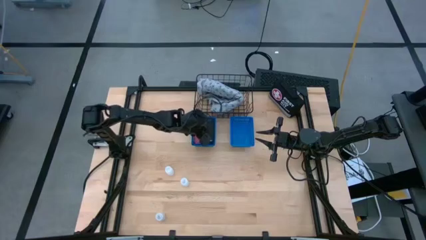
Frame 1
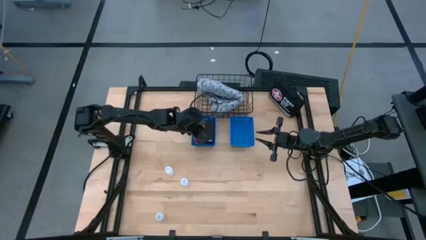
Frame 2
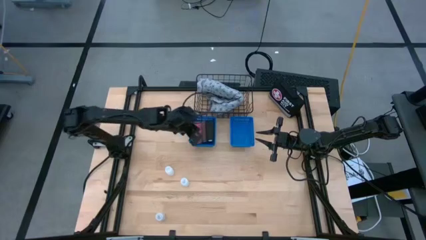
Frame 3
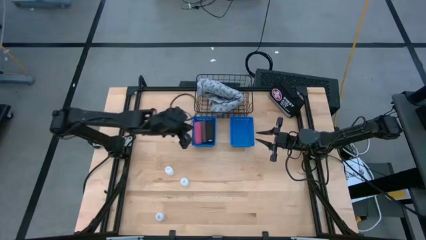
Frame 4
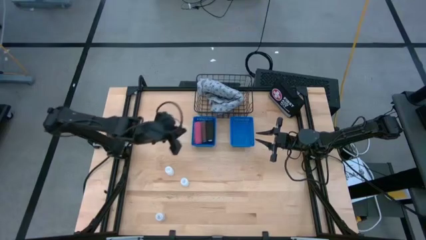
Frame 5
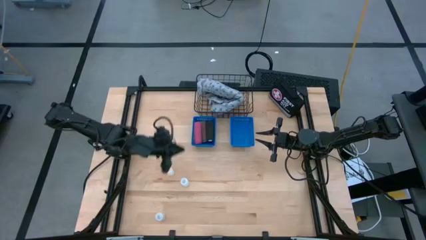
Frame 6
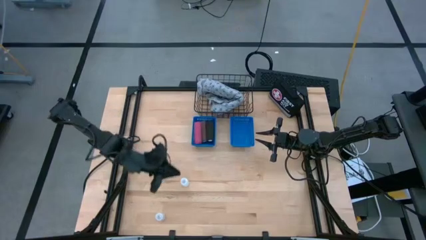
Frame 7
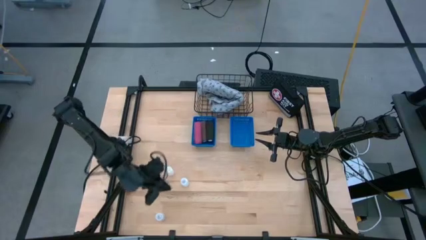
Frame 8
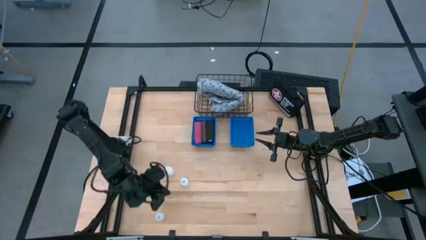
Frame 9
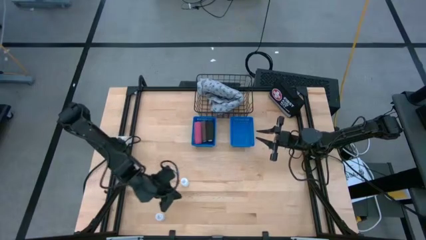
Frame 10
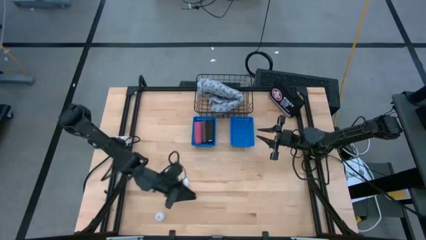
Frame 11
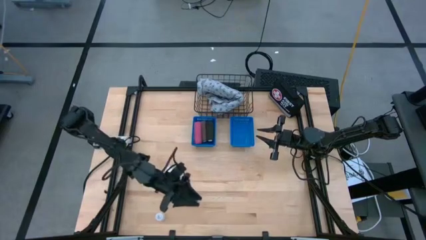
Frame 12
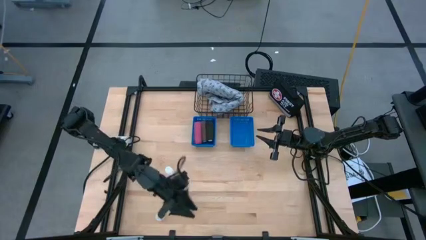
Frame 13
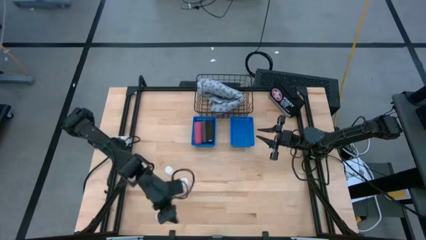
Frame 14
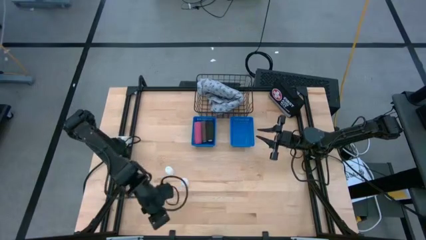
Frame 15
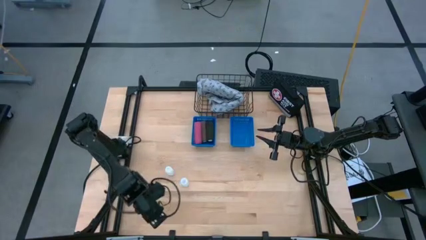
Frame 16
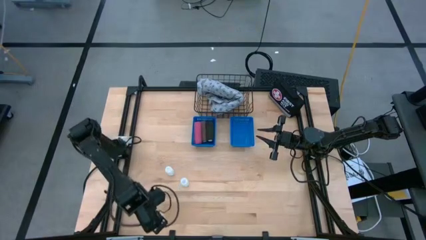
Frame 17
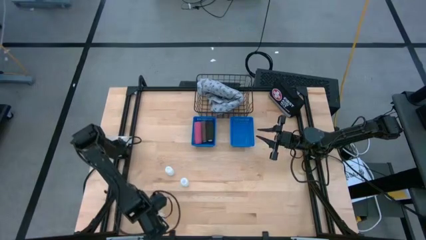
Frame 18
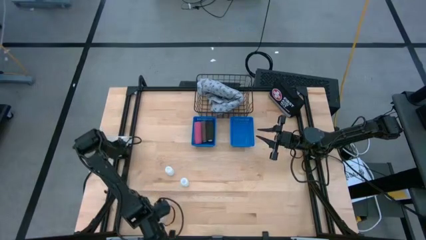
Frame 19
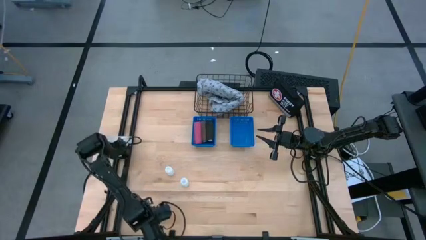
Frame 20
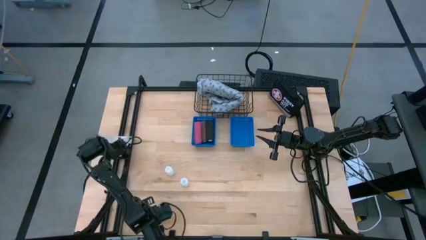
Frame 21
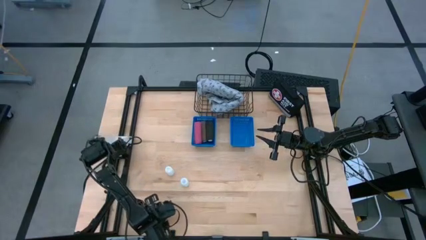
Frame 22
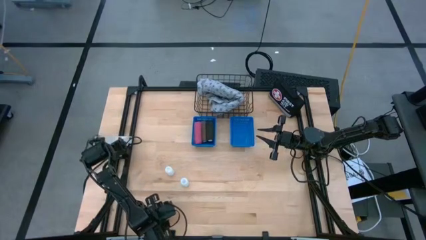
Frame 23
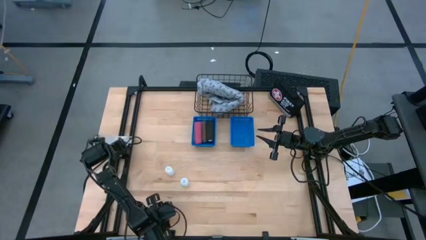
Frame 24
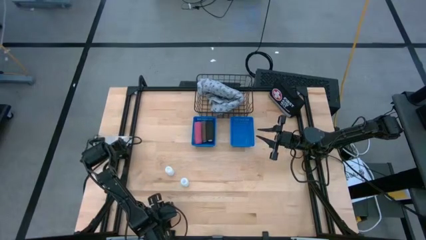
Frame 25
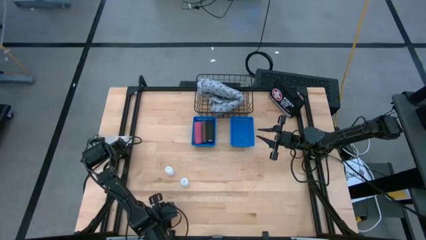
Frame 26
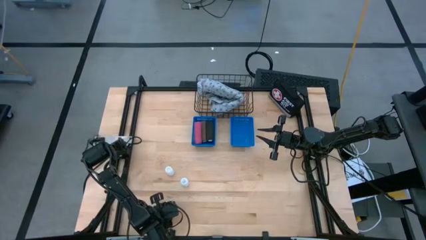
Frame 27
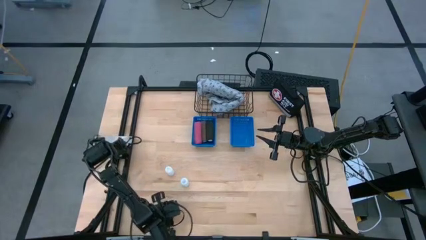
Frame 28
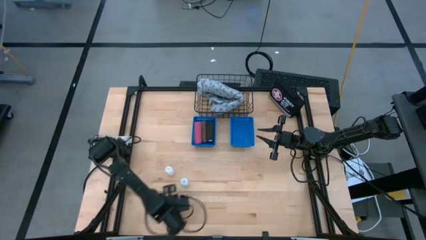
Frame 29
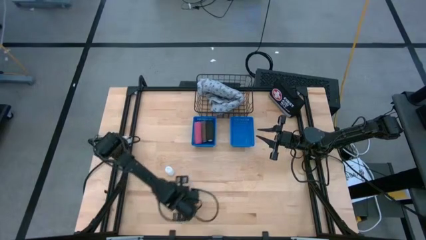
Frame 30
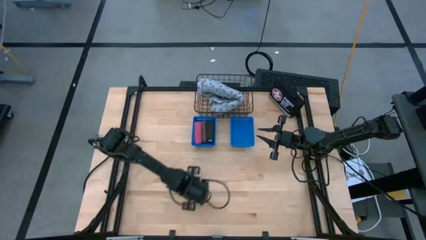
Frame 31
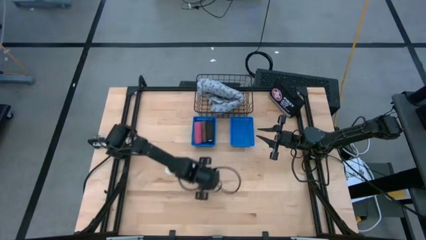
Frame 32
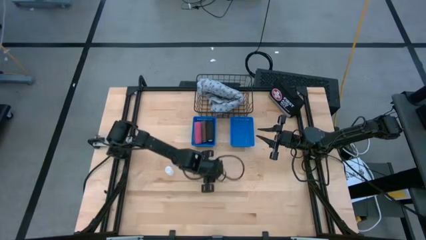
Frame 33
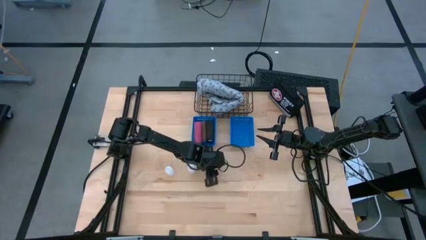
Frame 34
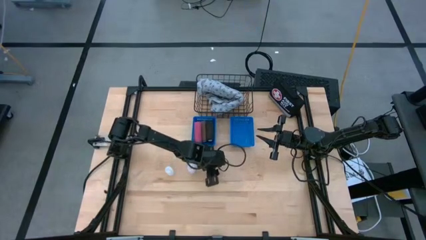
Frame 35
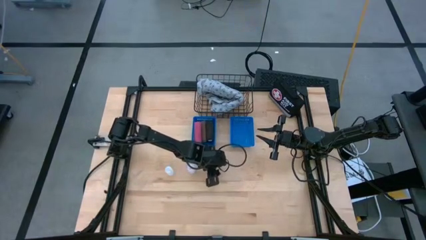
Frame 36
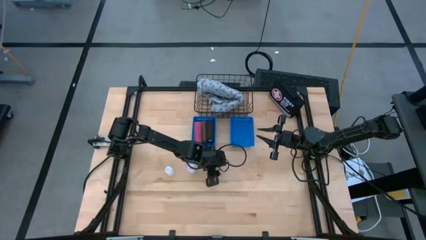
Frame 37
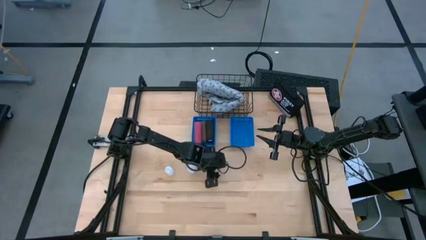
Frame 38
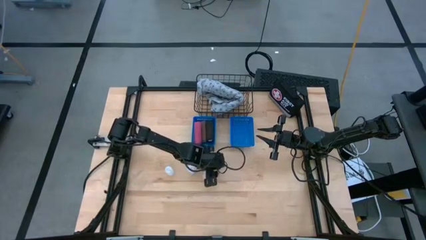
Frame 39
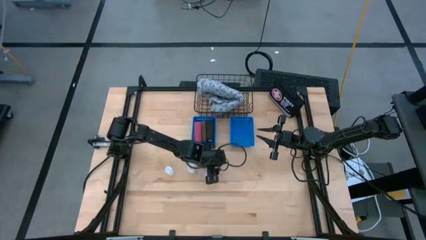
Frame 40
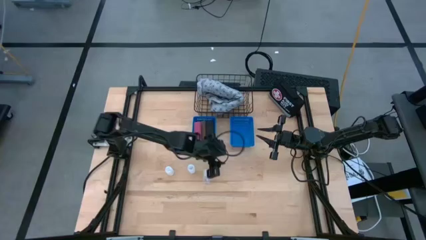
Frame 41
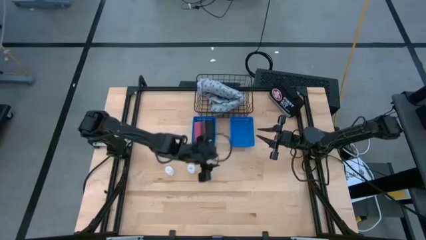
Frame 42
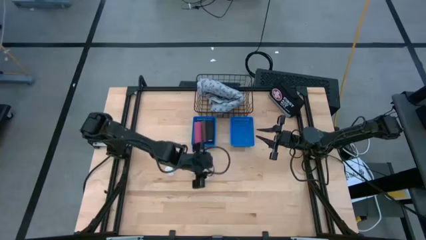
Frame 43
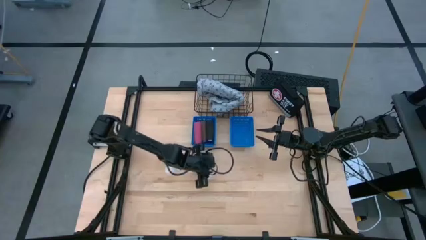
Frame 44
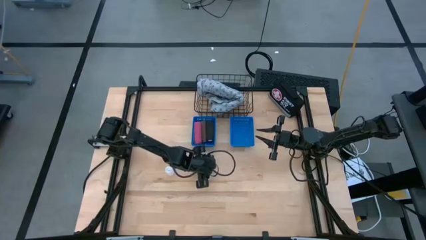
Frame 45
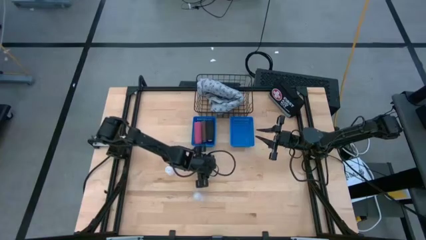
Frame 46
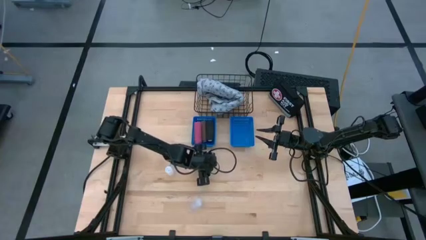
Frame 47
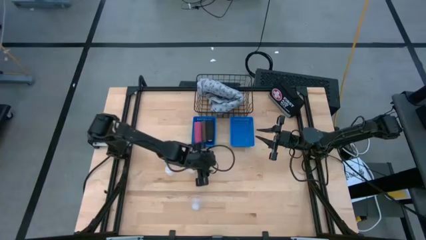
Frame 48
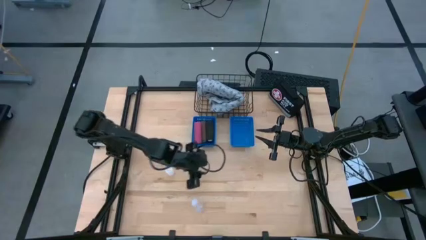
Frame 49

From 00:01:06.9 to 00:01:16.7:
Task: Pick & Place Medicine items
Put the bottom white pill bottle into the right blue bin

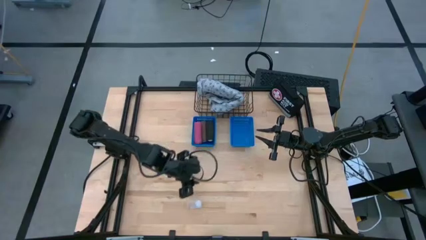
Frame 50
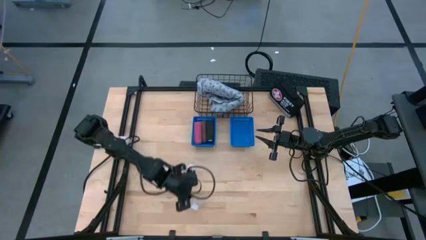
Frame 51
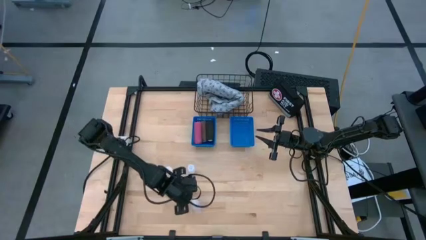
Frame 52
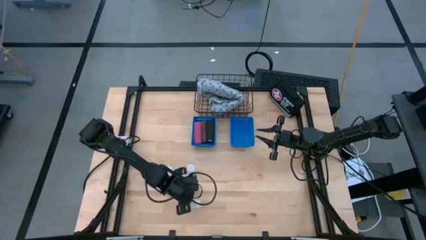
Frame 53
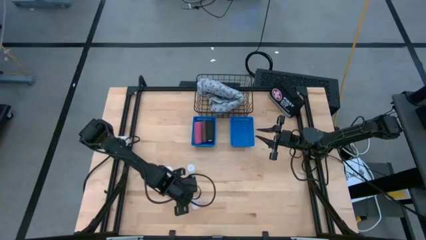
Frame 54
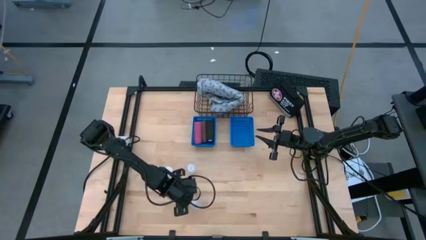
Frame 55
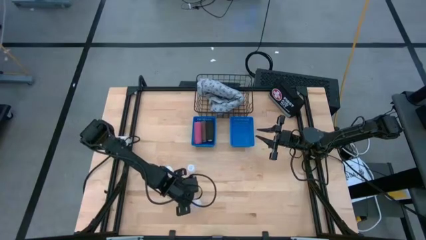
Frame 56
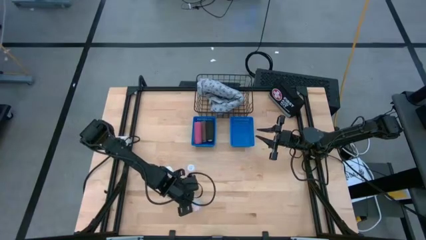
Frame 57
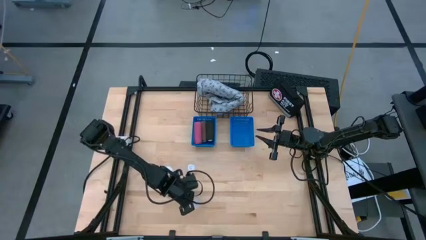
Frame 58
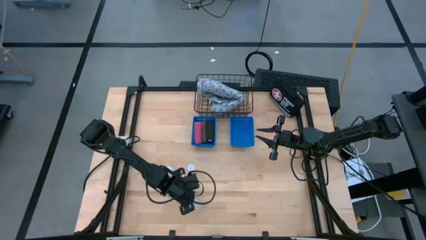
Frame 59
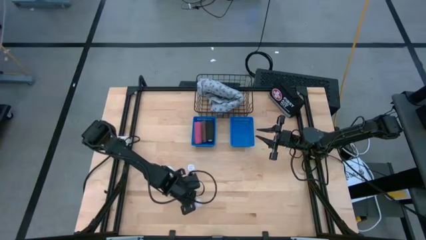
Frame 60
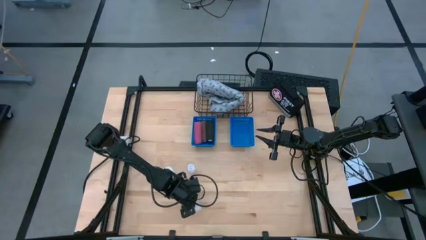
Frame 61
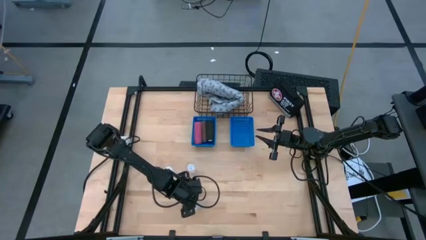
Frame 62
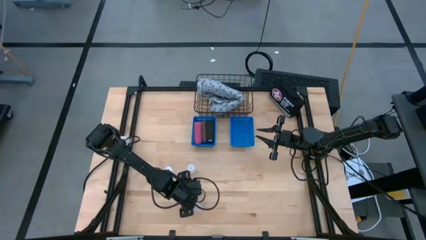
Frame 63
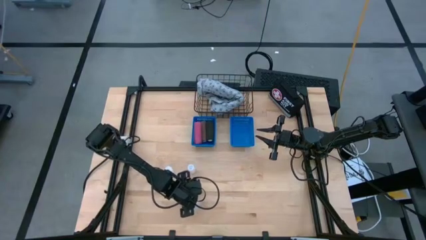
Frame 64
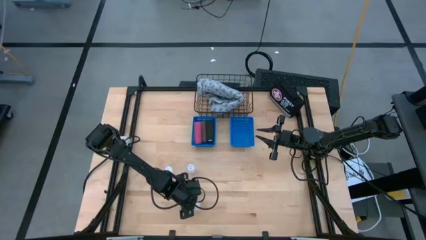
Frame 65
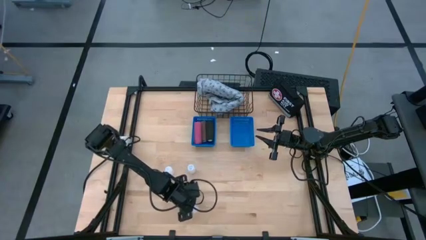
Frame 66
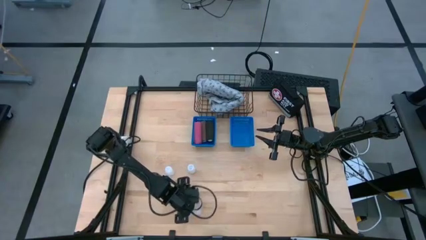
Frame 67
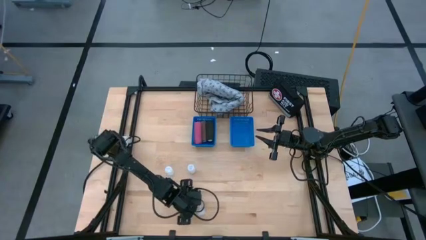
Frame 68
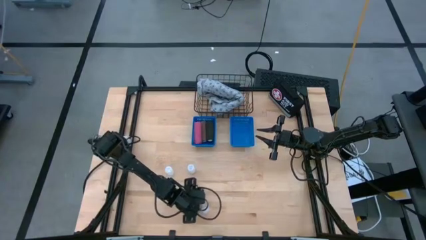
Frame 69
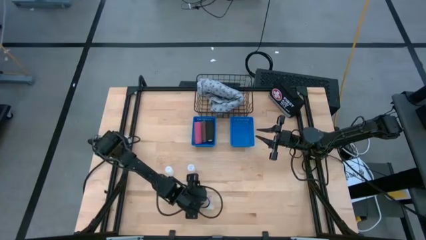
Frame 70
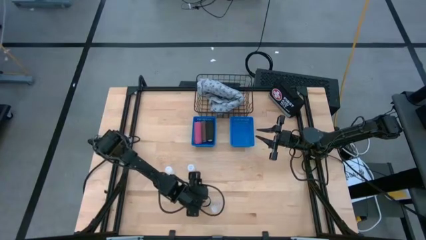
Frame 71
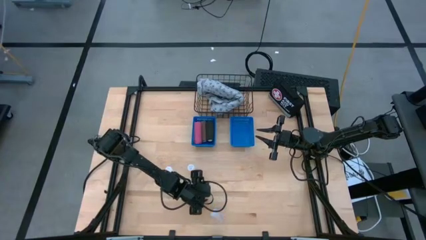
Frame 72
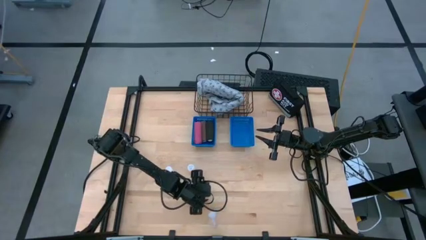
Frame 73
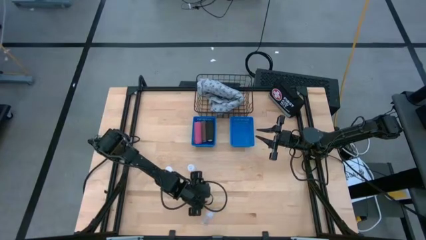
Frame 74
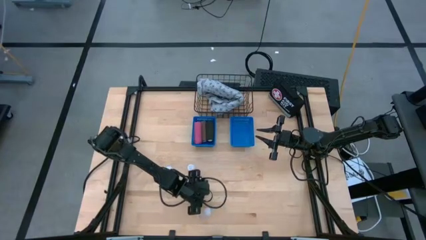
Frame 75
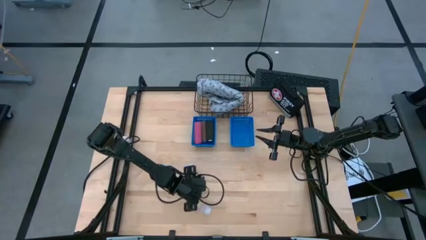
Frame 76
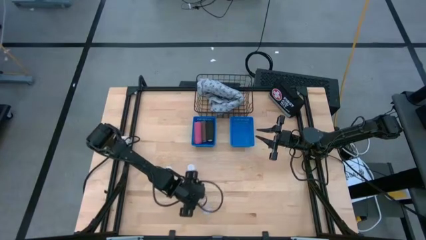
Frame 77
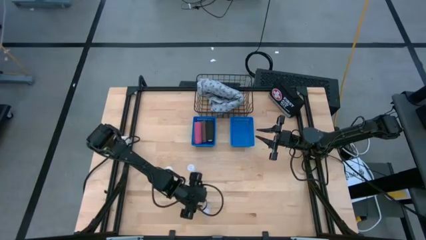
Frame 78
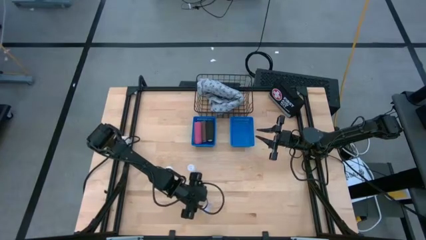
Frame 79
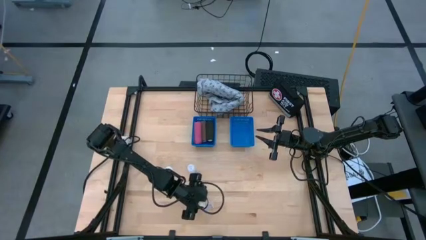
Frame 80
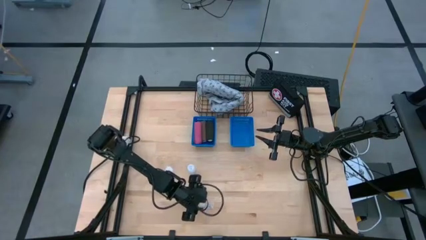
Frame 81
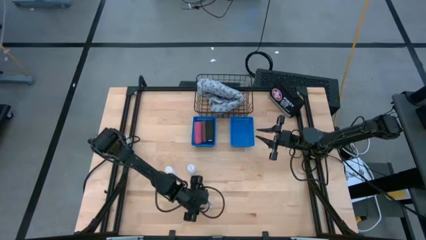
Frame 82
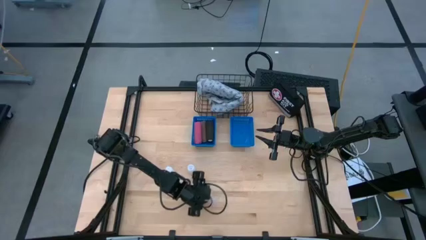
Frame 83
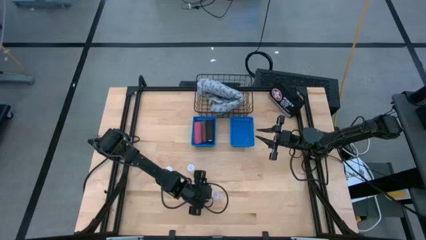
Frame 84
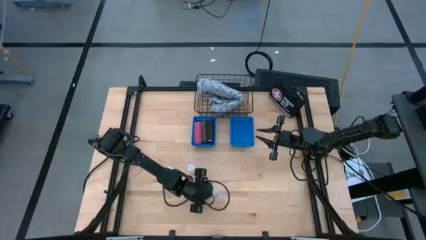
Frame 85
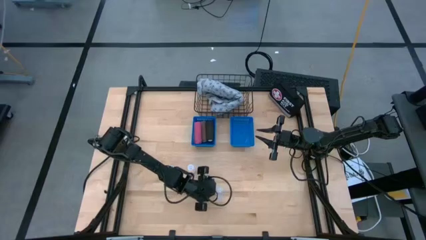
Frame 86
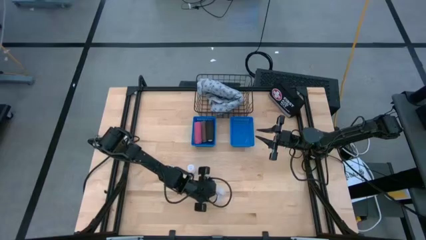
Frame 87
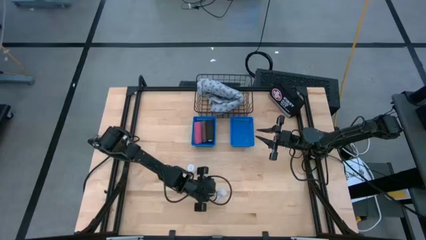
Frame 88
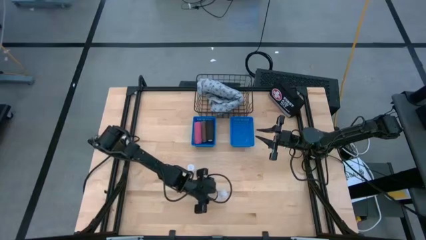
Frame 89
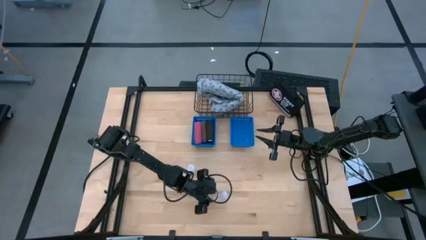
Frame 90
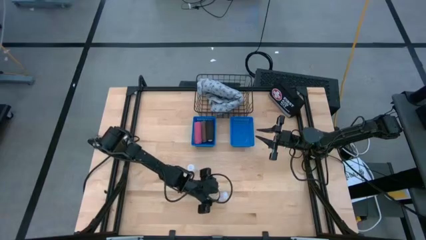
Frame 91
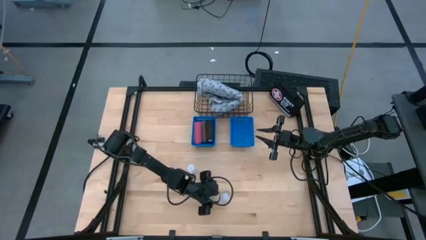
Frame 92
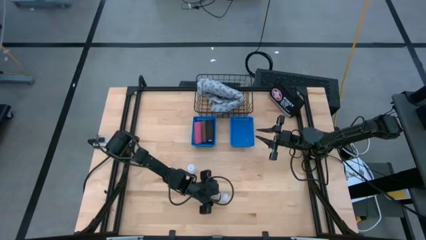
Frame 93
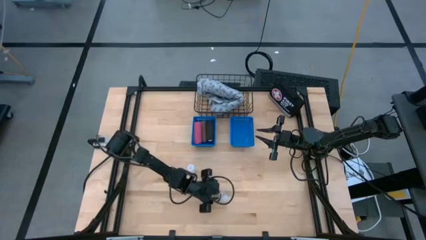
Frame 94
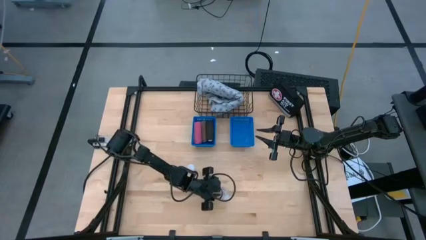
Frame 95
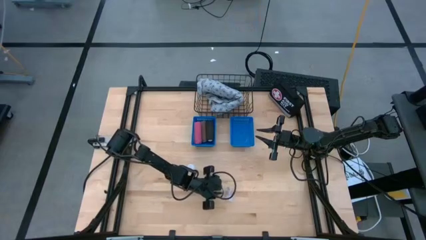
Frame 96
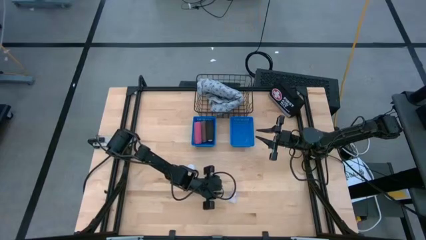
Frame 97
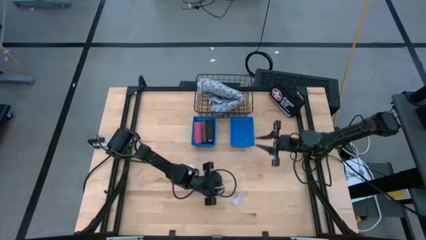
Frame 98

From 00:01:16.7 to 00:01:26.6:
Put the bottom white pill bottle into the right blue bin
